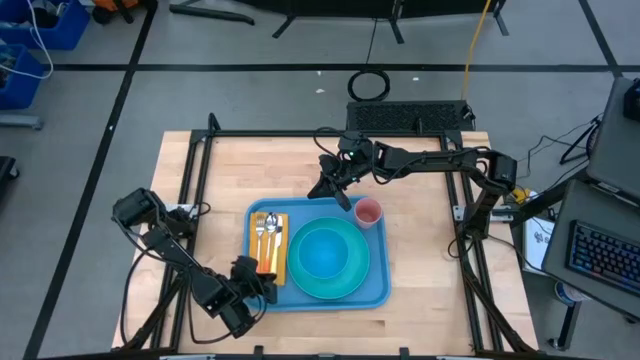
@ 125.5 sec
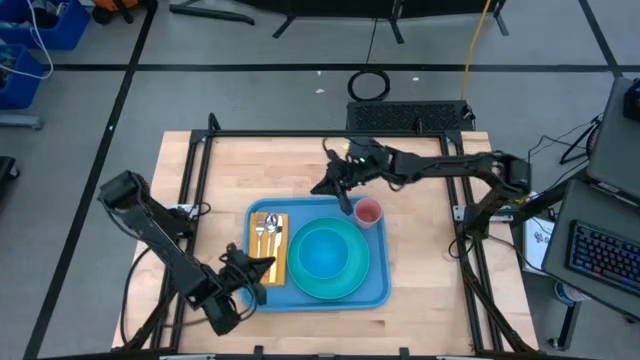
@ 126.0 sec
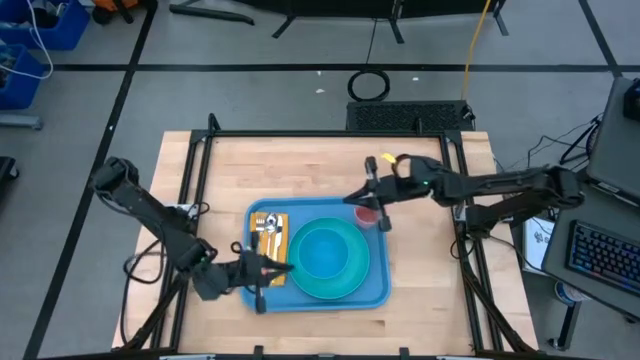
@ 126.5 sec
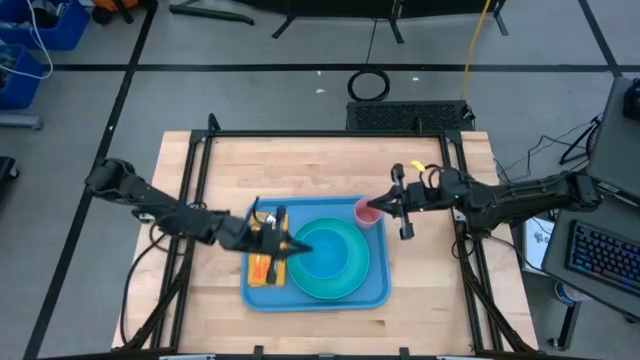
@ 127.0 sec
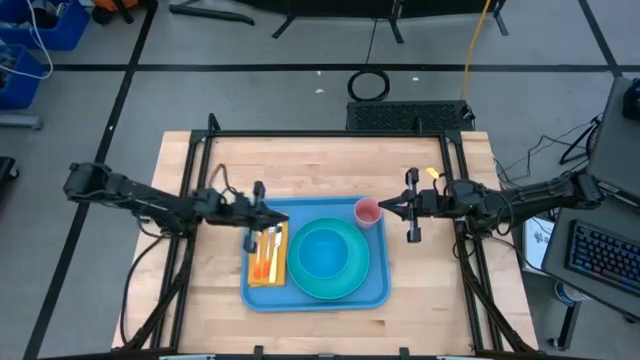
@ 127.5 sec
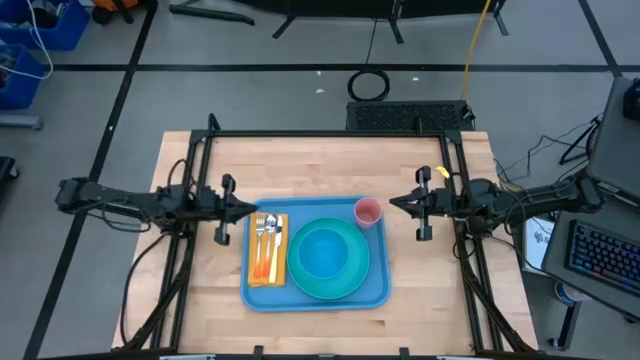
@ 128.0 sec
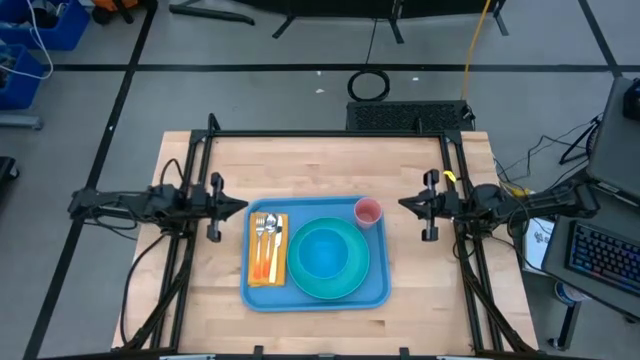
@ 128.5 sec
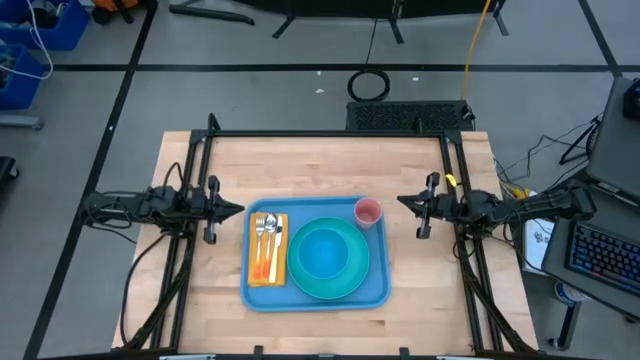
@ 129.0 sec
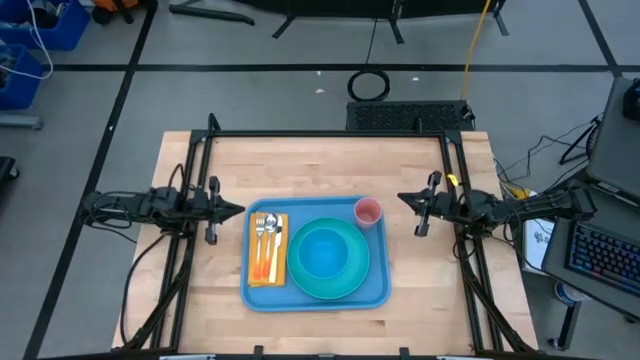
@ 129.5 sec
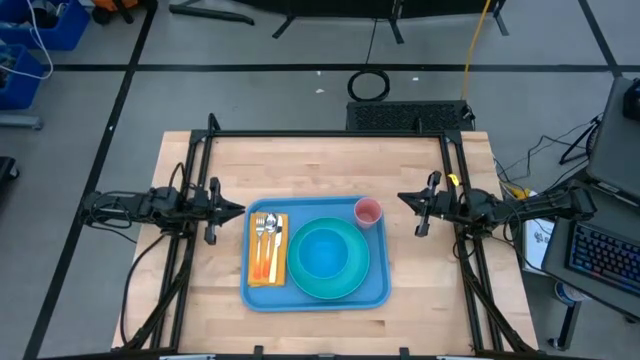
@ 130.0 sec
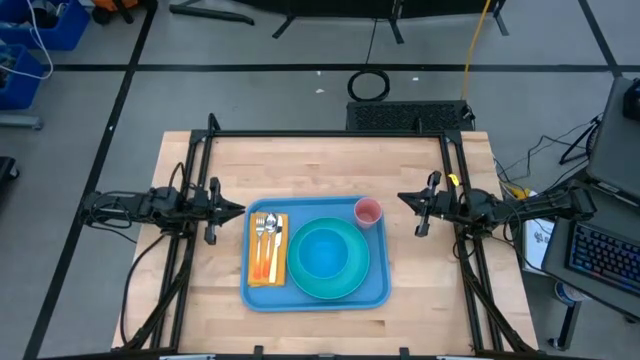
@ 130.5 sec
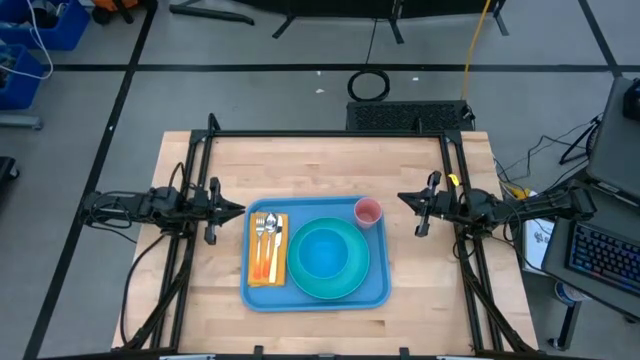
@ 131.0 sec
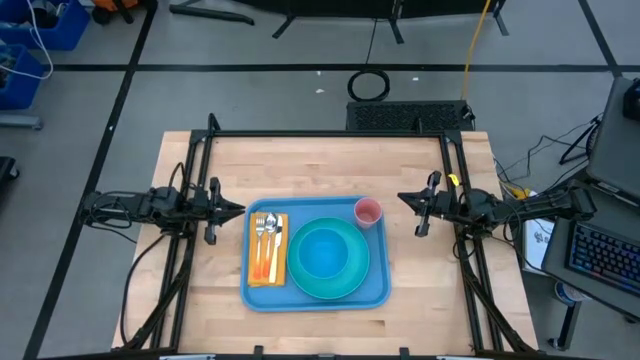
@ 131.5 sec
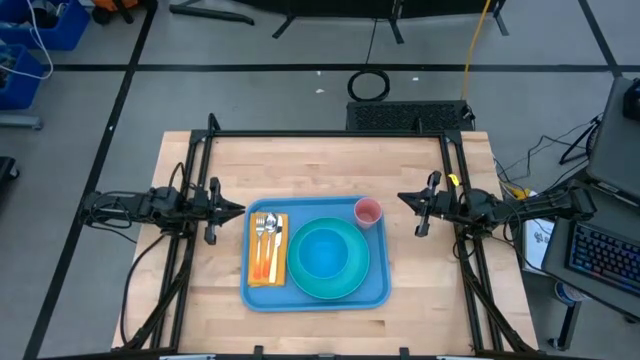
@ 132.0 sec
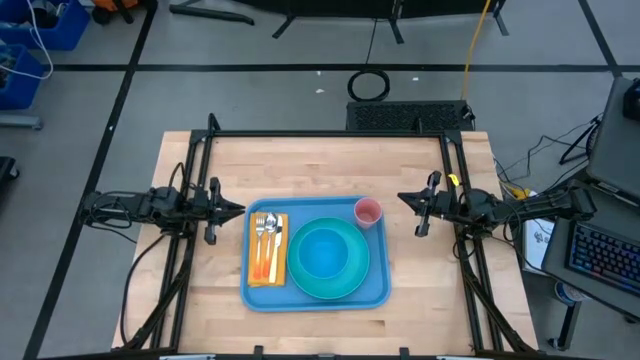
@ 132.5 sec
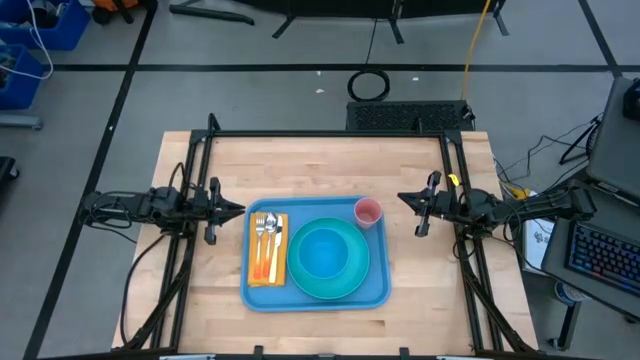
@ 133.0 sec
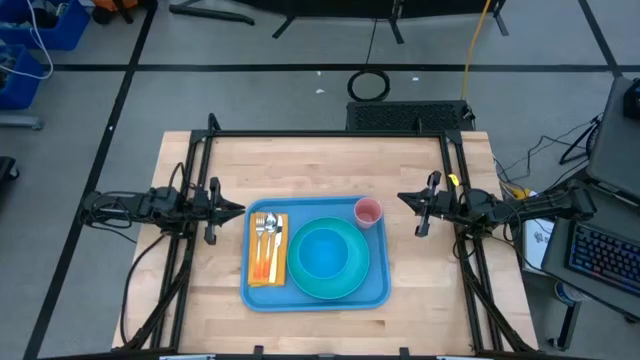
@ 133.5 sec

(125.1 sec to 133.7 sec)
Task: Set up tray
Return to Home Position

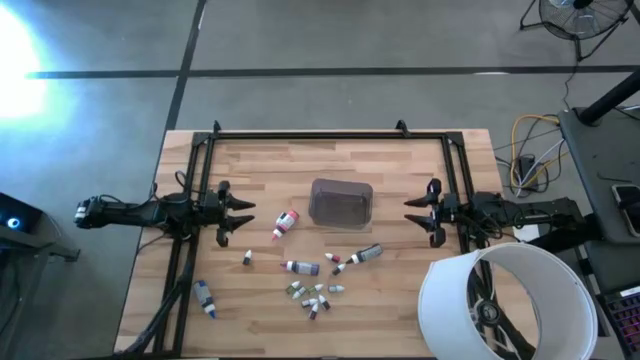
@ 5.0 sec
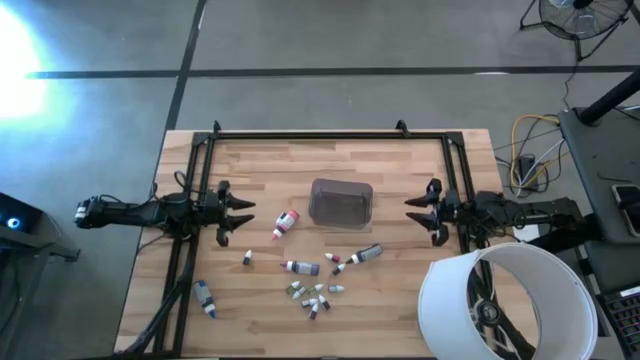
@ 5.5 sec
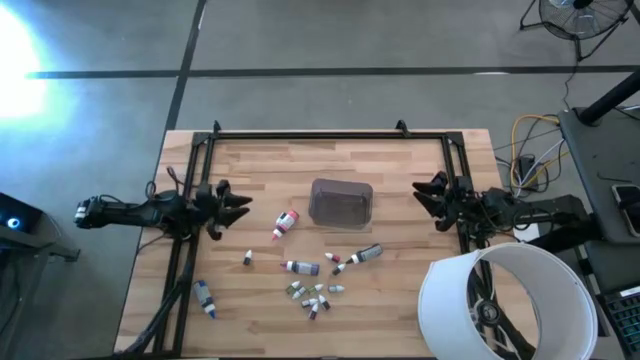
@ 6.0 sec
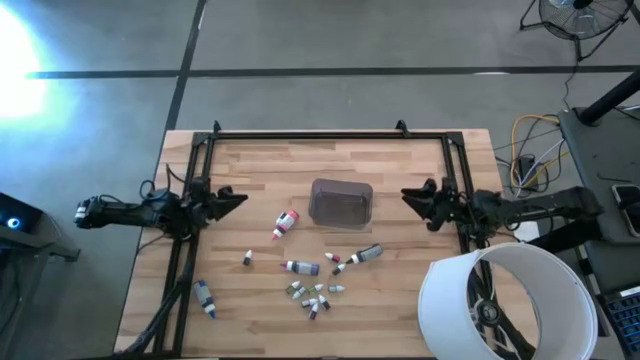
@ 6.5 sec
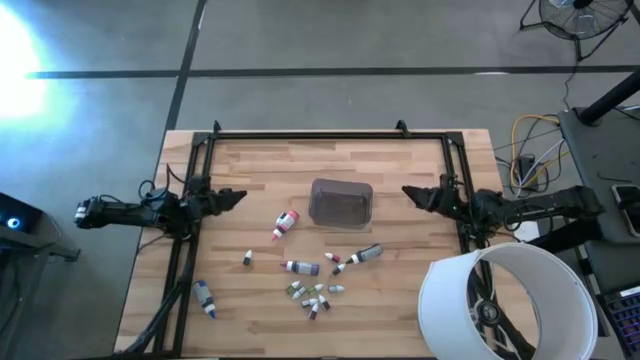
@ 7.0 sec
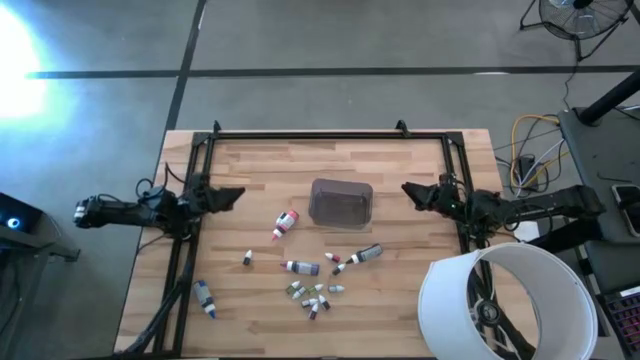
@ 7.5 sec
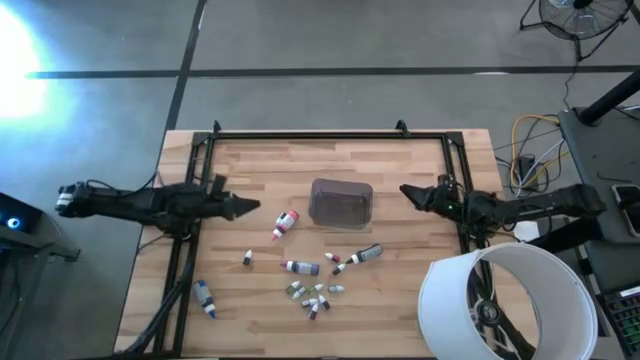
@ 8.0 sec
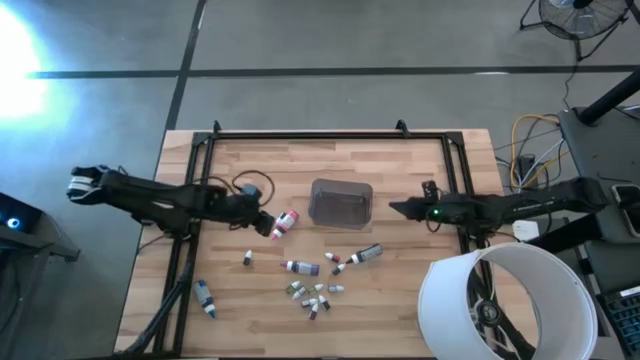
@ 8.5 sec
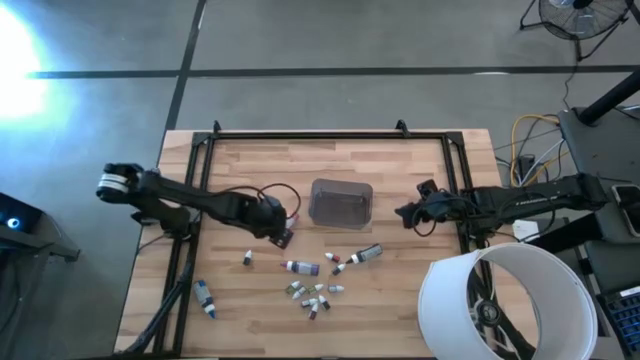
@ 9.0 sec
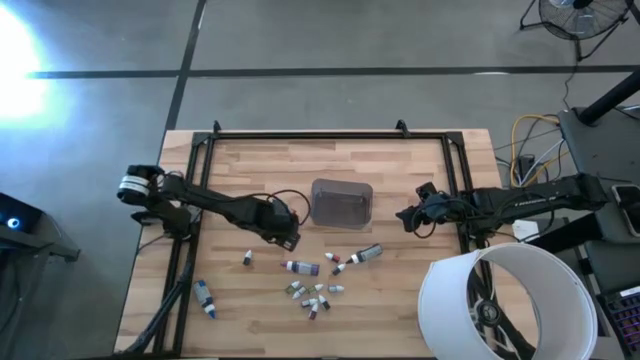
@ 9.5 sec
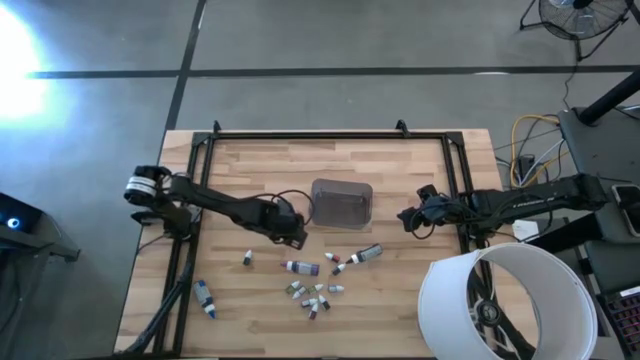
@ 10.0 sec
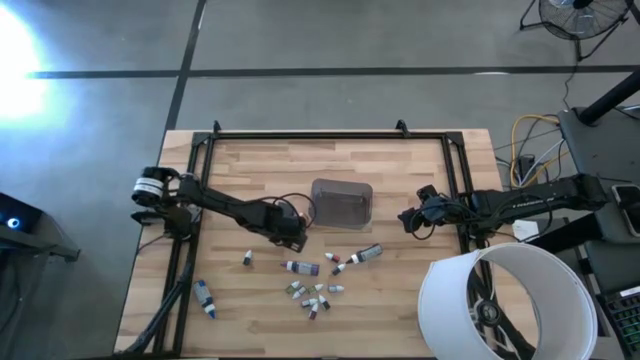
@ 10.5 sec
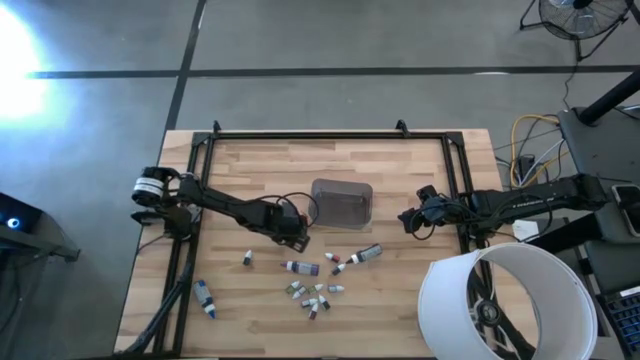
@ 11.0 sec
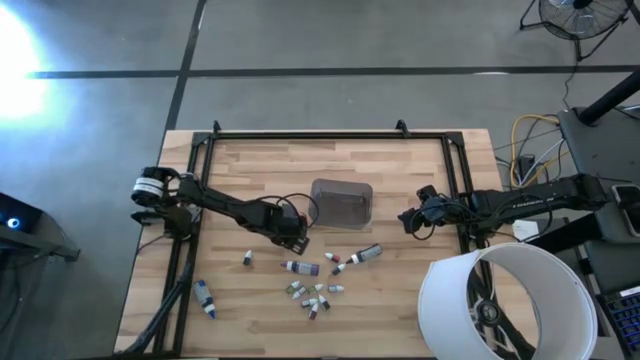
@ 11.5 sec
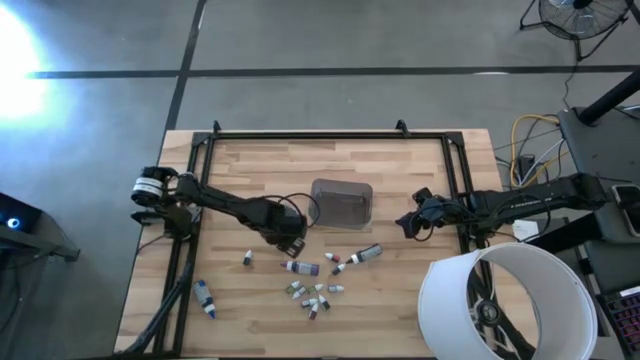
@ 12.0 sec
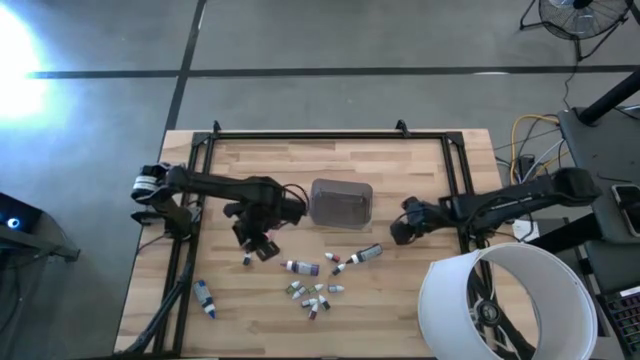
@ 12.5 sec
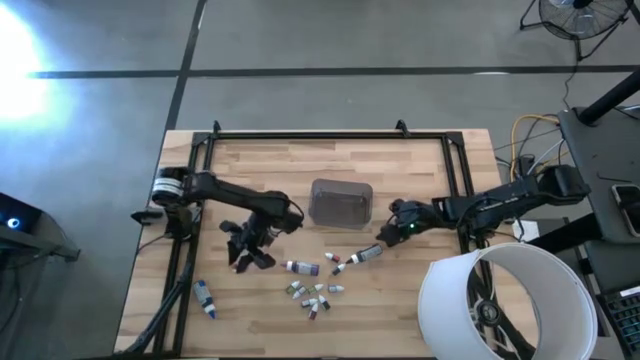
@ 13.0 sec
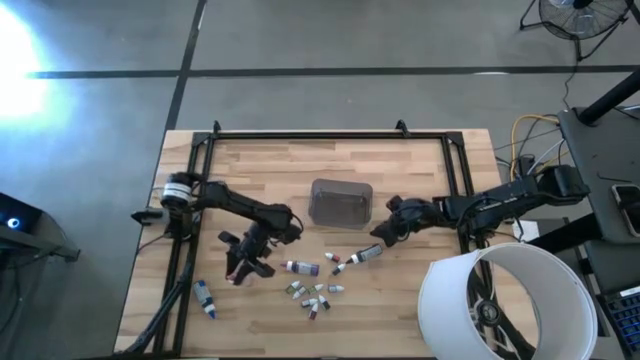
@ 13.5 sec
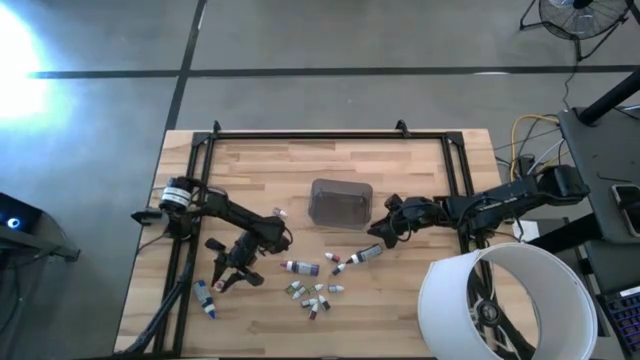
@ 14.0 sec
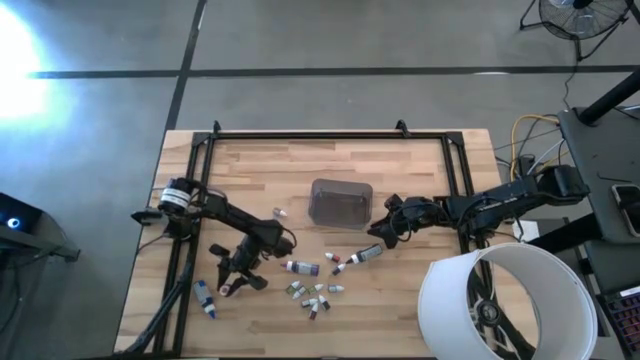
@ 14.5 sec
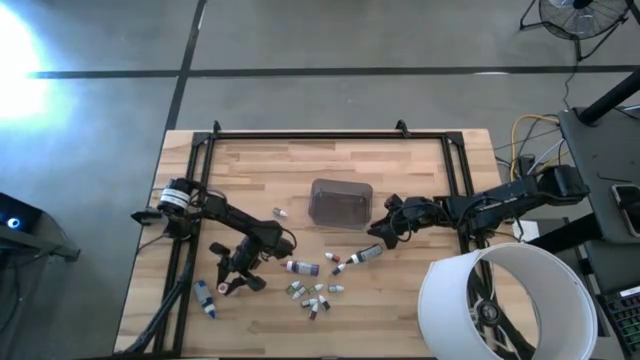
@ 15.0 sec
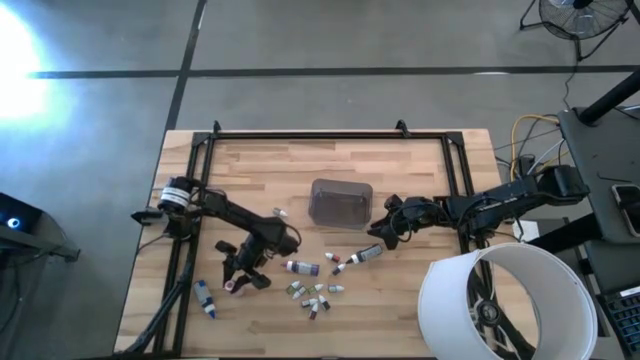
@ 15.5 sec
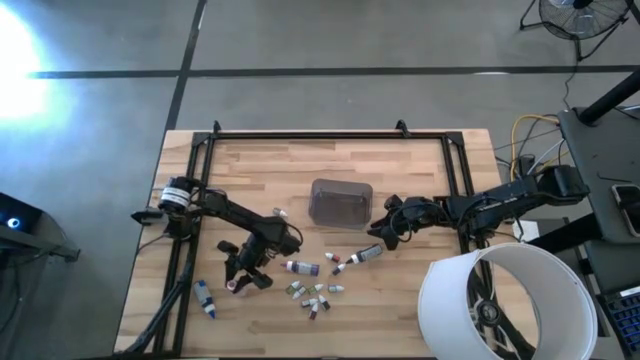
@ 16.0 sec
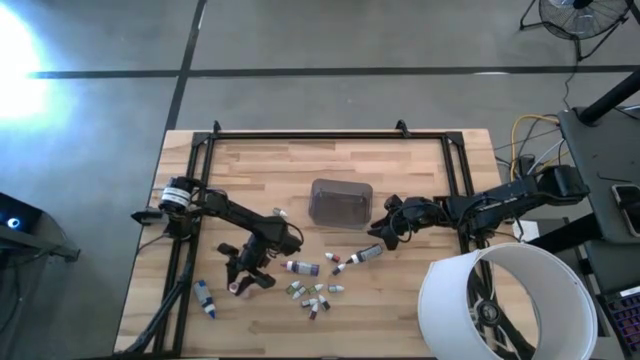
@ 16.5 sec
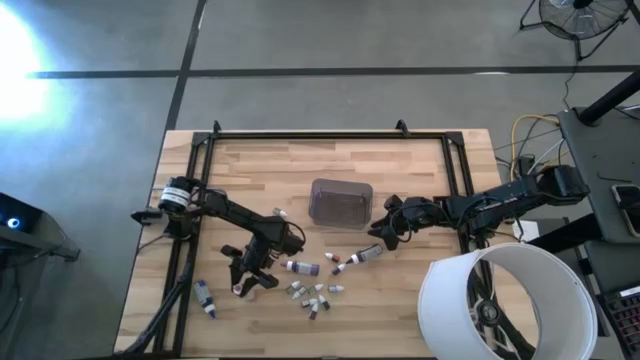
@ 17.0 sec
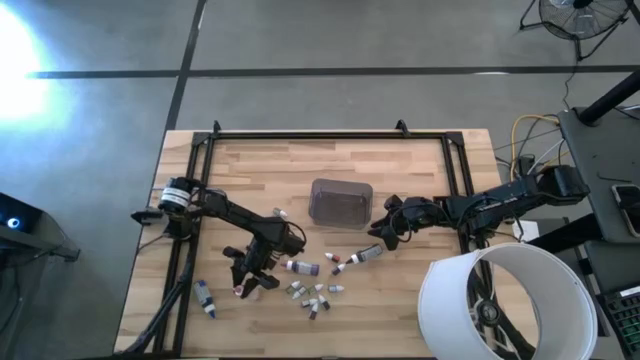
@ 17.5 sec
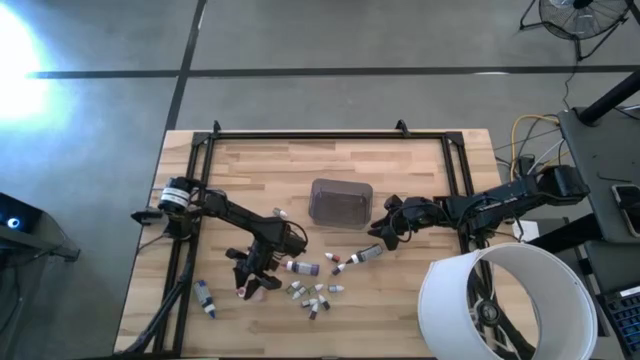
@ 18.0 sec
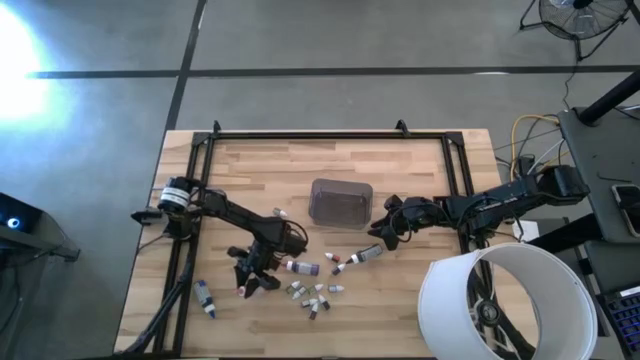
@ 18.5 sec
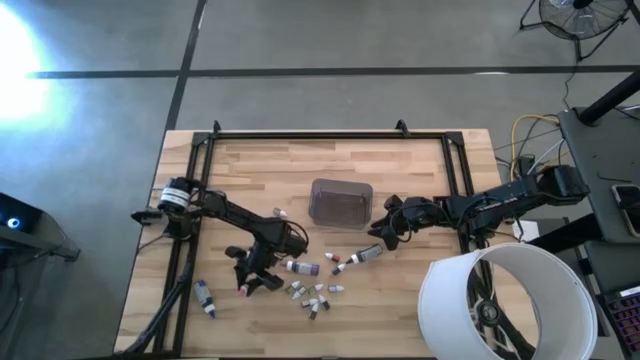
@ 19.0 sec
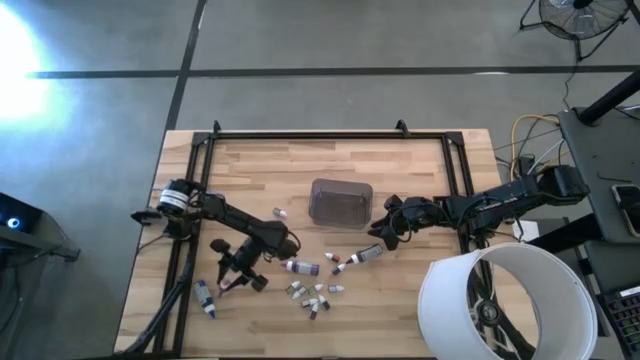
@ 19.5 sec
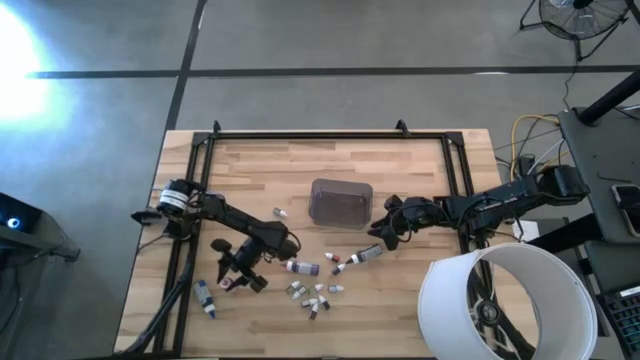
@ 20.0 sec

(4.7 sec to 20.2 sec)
Task: Pick & Place food coloring
Prepare the large pink food coloring bottle on the table
